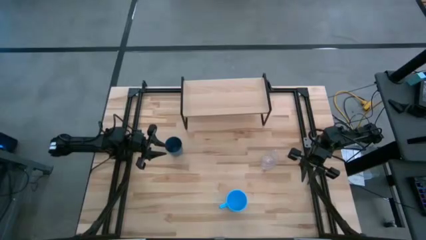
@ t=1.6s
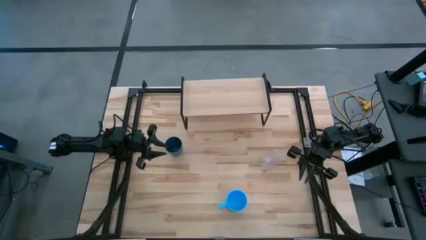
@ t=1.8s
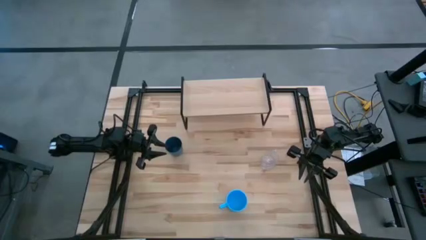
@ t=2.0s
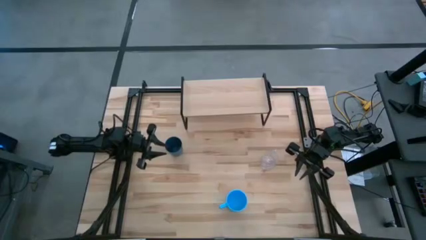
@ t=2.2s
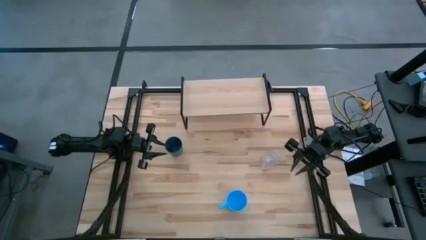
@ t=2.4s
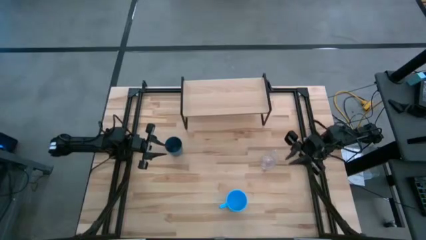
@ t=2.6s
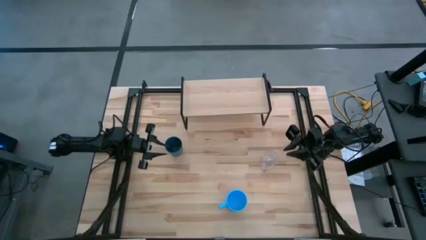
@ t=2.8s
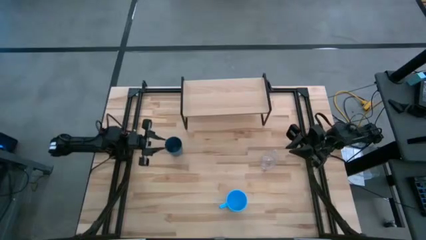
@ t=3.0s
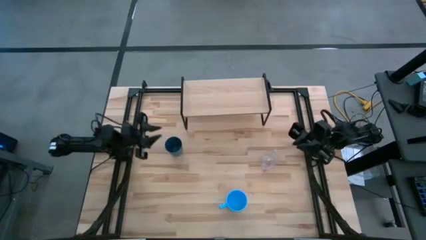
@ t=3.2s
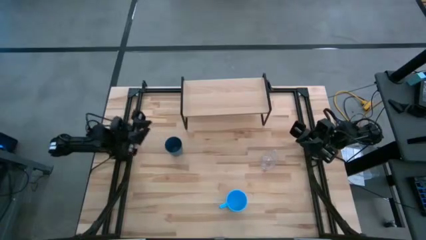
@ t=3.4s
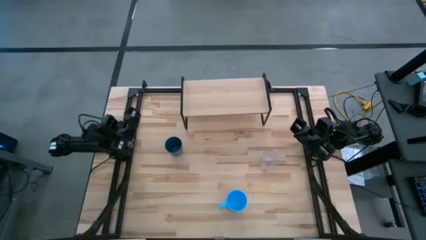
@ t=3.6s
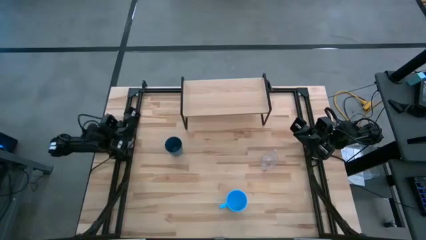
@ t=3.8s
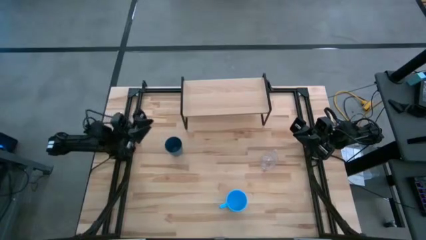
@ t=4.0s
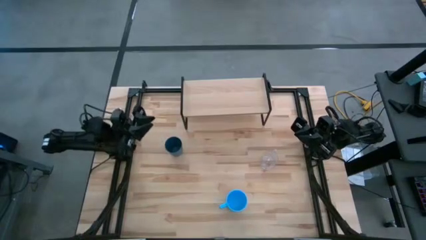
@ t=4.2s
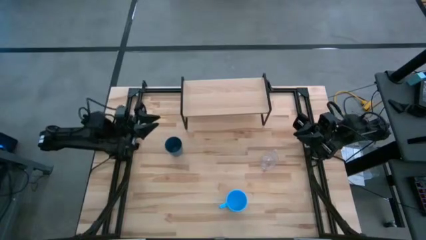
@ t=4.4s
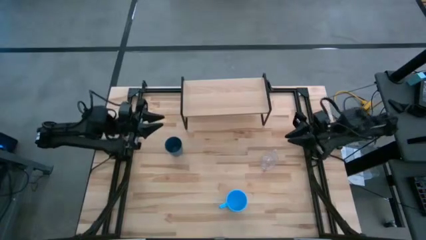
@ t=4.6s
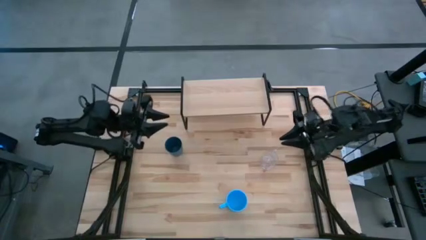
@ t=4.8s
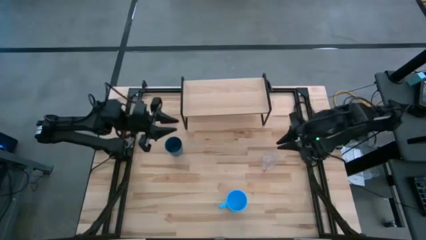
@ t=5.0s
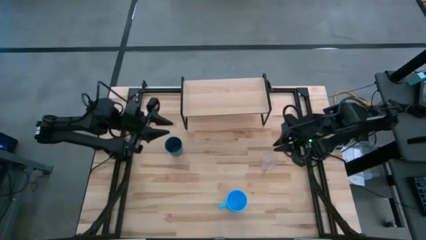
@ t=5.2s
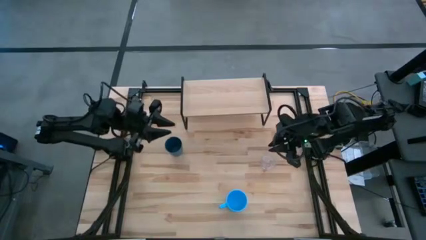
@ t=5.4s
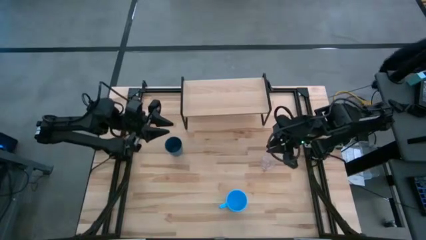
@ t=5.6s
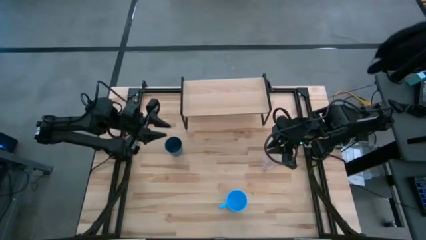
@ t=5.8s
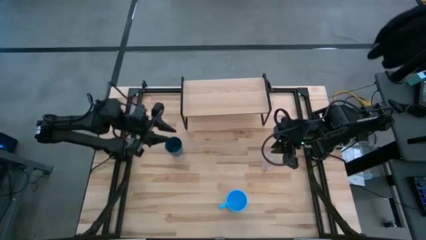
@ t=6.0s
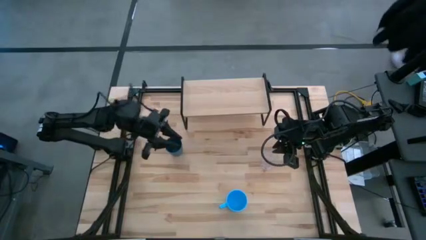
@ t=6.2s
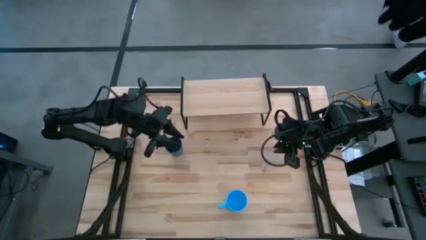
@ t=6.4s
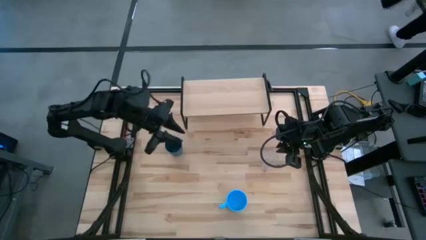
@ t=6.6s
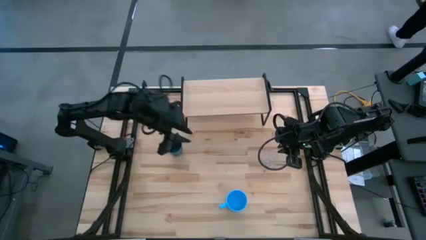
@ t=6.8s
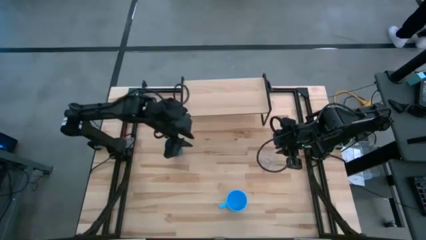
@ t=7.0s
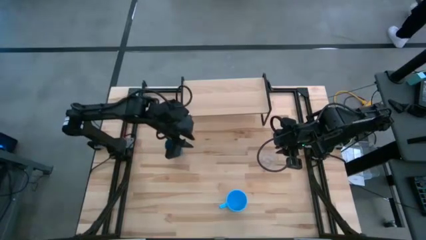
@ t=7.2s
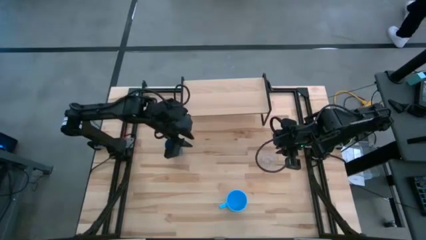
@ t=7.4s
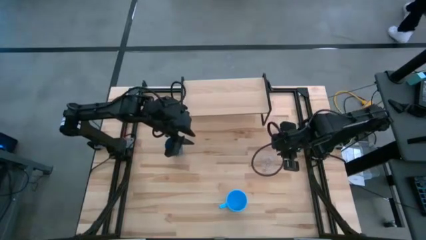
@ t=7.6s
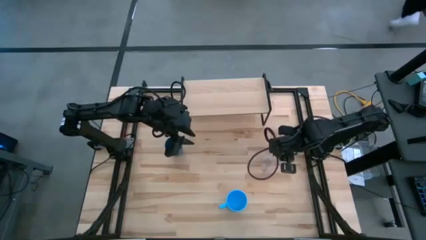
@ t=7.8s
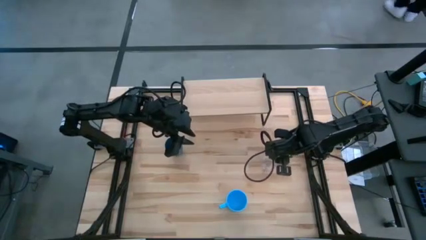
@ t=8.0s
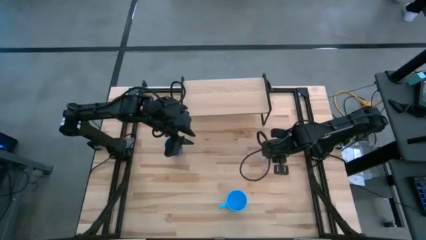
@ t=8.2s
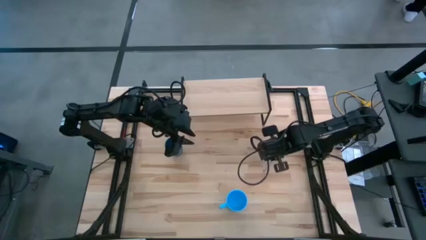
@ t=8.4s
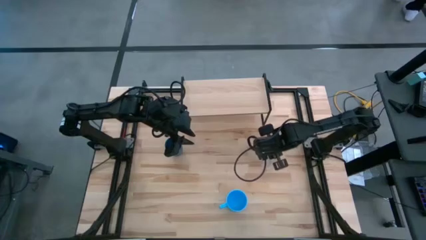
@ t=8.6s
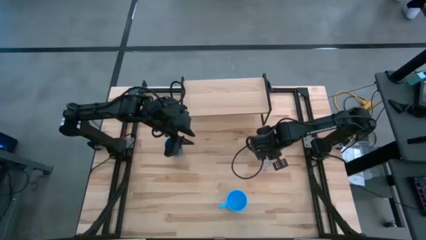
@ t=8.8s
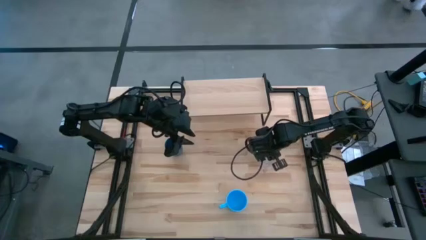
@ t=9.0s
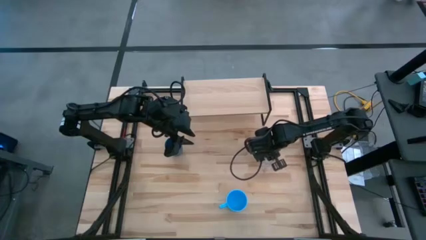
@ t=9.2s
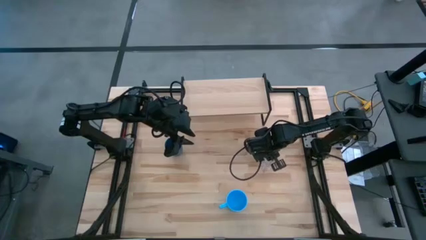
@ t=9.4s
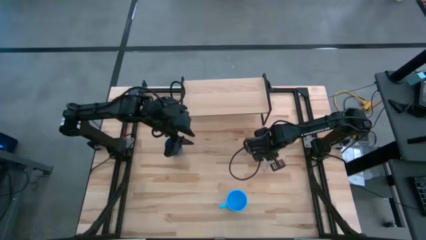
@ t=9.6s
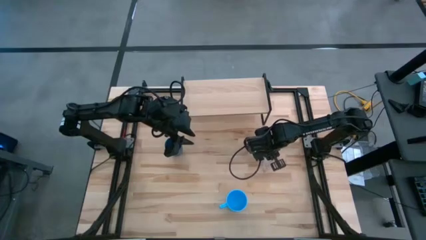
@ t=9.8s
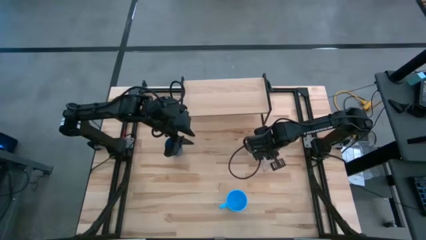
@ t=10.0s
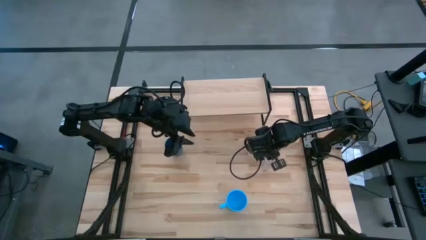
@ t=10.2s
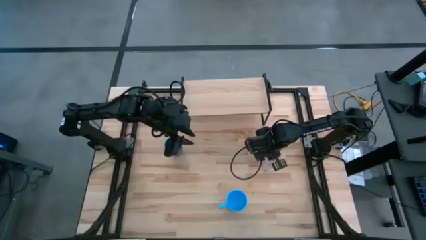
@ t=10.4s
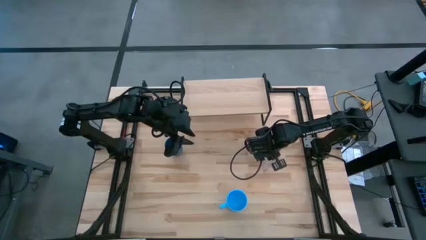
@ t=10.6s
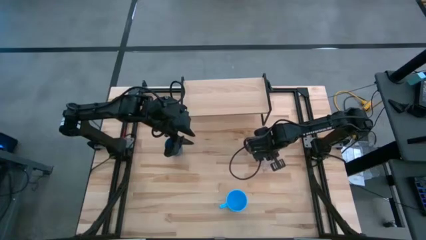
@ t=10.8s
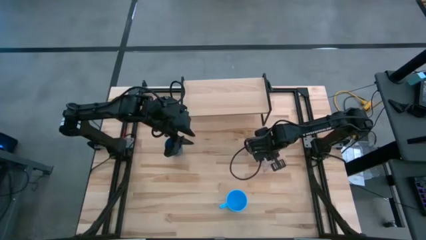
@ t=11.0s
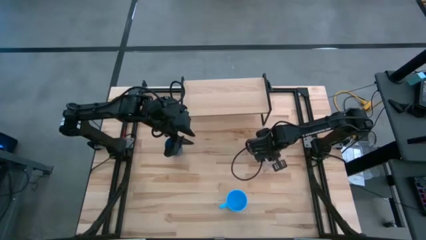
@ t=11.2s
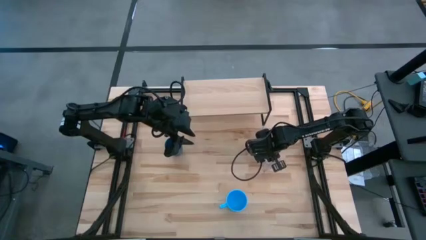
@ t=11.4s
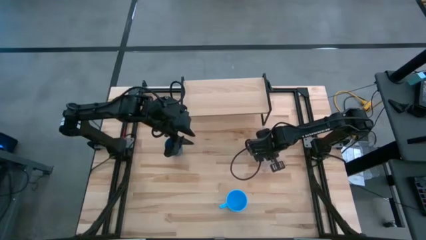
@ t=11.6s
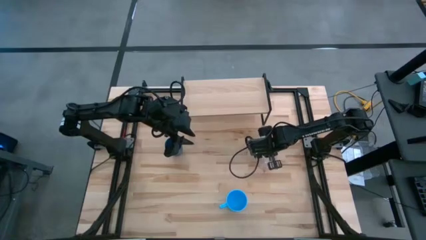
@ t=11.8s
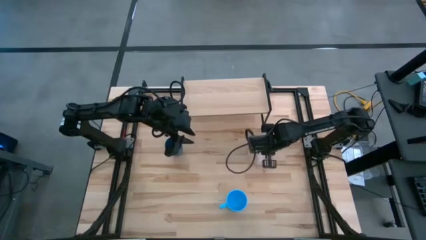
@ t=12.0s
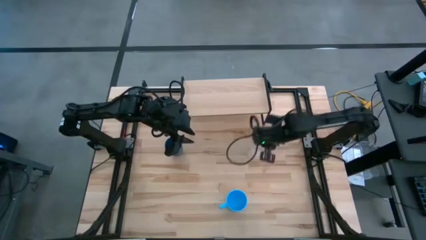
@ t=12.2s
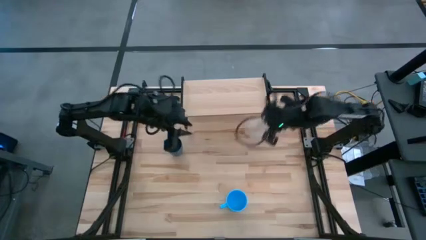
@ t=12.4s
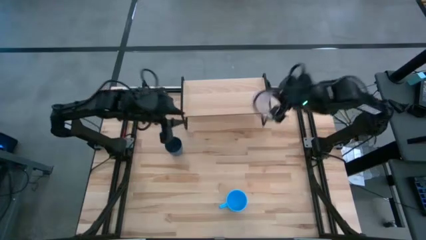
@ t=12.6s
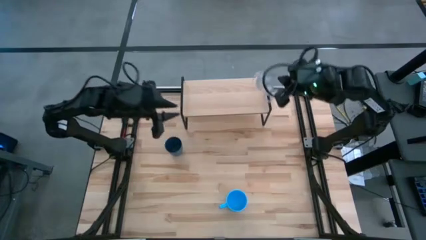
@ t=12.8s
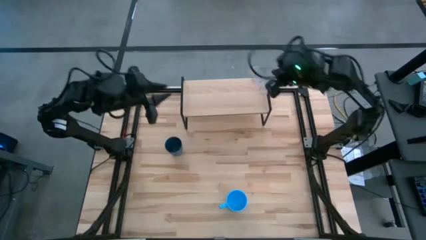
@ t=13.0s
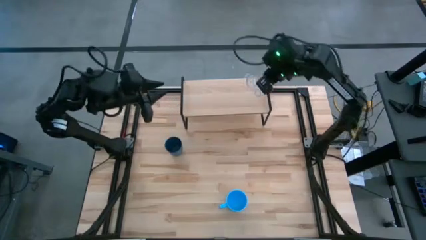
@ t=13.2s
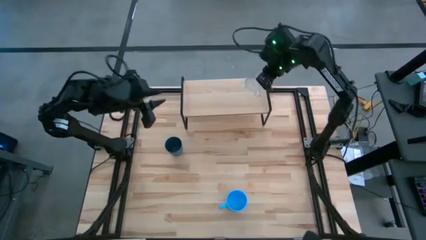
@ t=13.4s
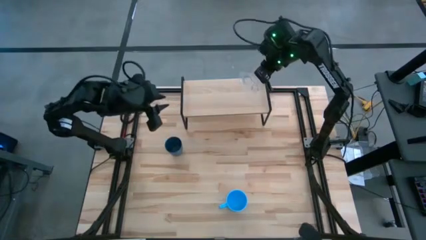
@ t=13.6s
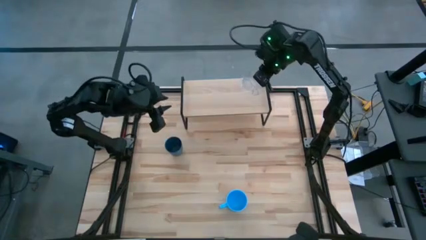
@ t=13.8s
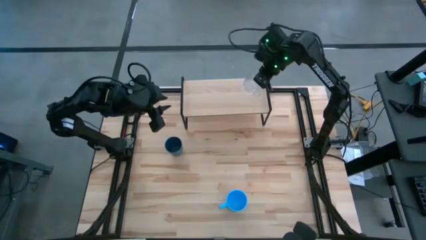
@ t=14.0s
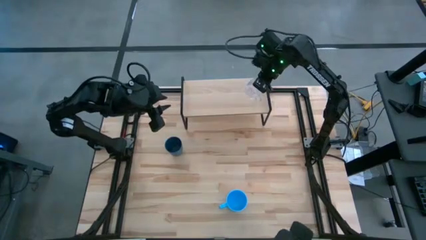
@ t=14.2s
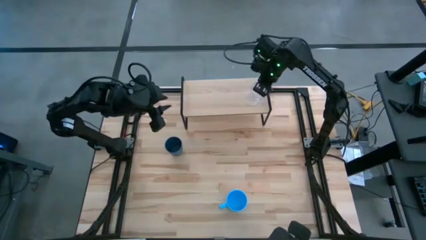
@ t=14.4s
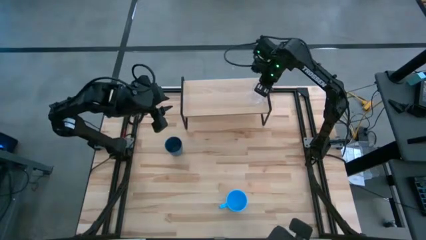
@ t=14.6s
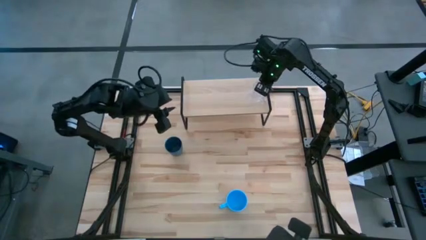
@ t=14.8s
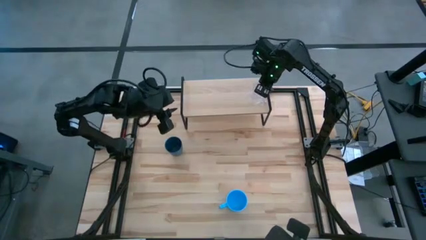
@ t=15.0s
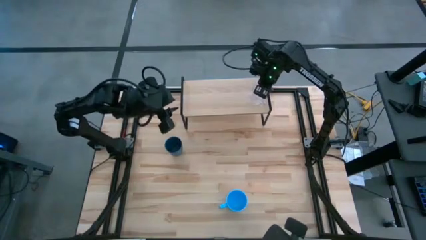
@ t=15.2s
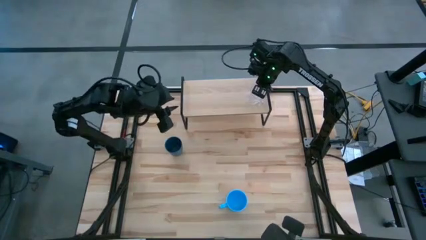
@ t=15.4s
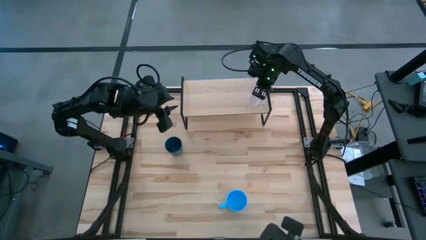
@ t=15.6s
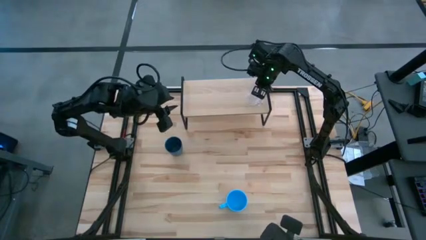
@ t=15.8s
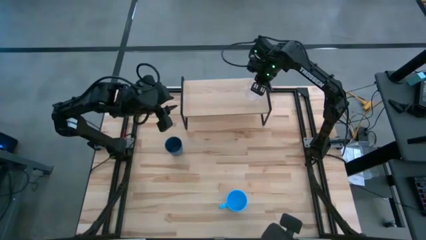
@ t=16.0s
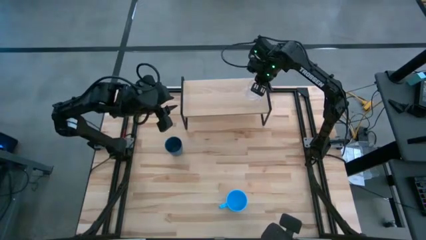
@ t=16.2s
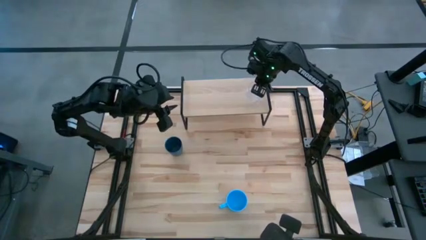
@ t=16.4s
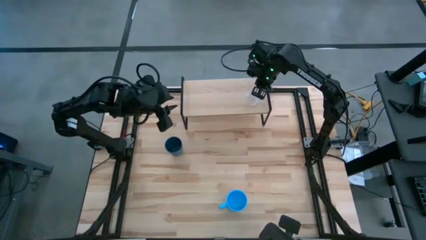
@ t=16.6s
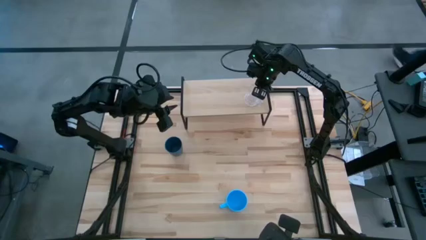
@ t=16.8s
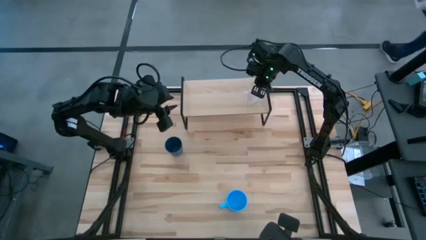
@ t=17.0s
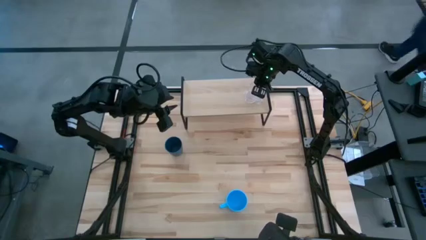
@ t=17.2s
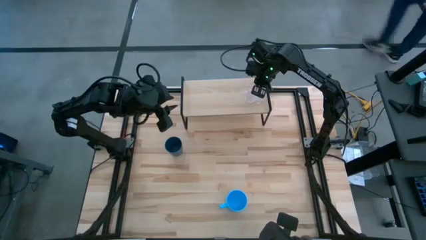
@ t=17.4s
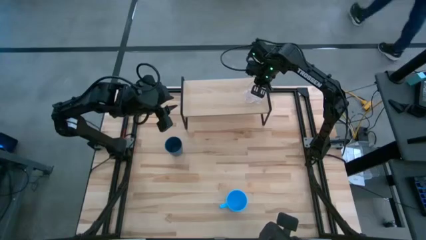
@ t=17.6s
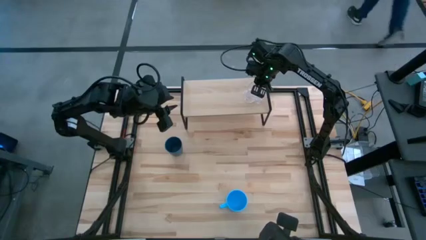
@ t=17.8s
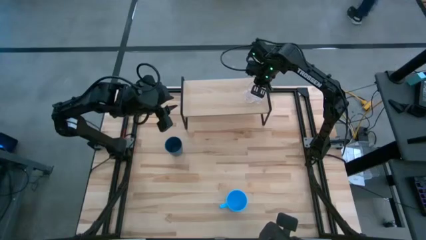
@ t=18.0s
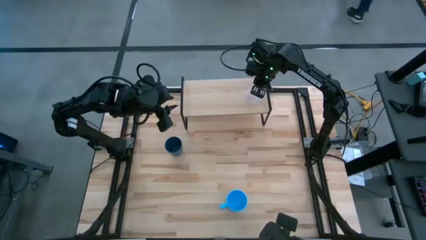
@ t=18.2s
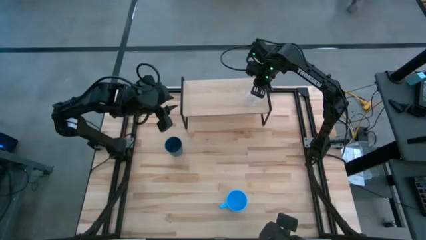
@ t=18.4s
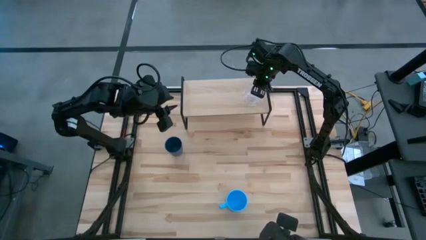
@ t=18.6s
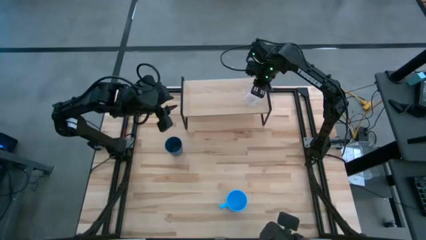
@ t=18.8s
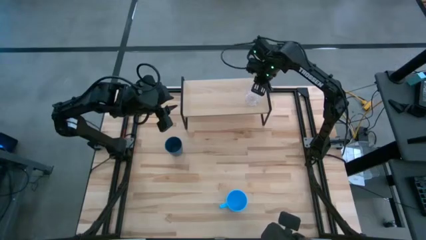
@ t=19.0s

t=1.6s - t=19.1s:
Task: Stack small to large cups/mugs on shelf
Put the transparent mug on the shelf
